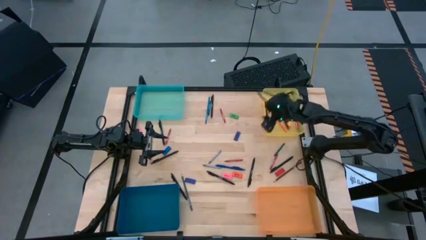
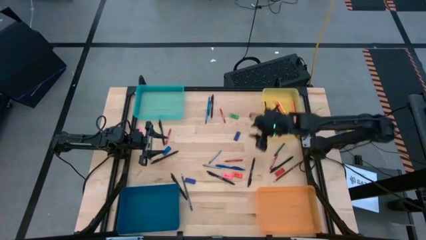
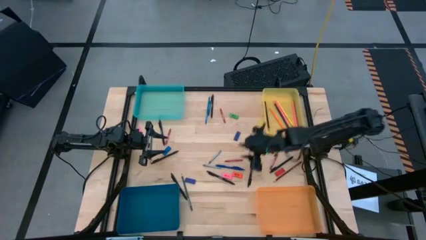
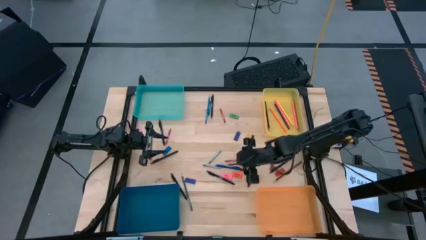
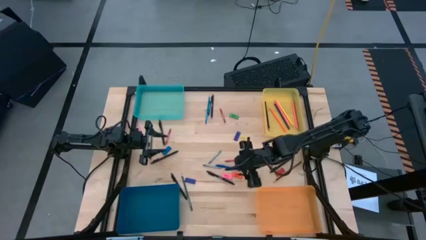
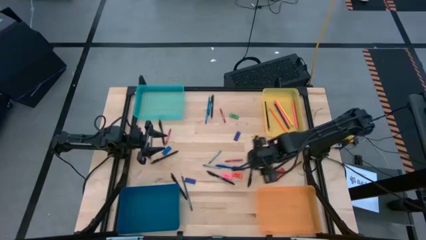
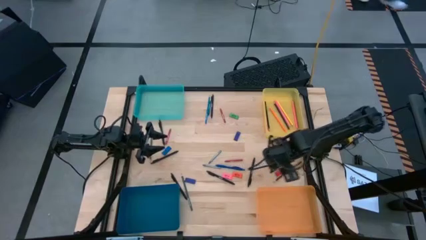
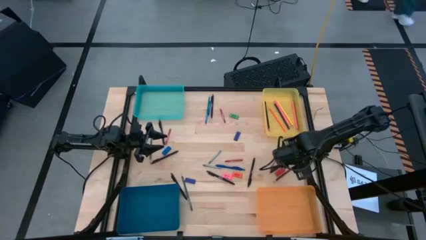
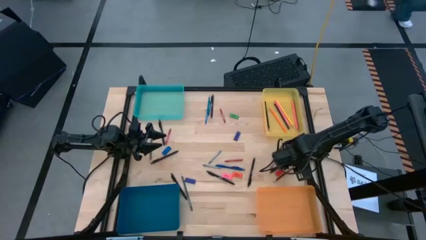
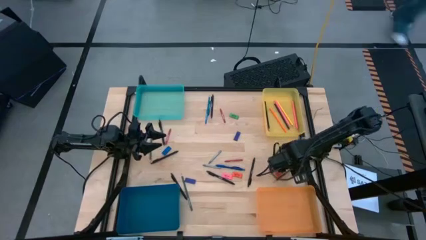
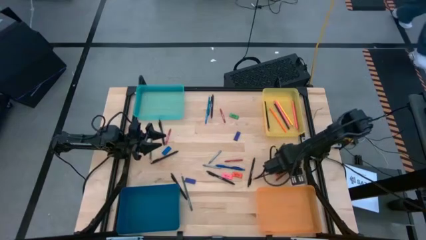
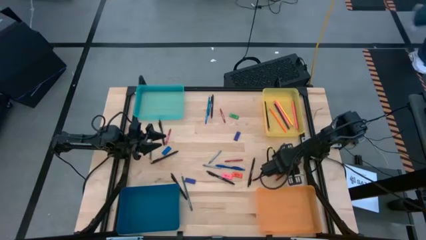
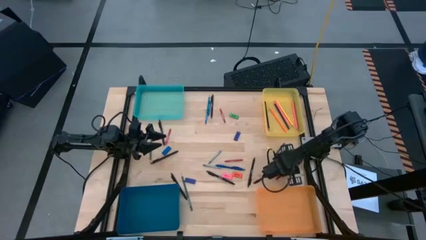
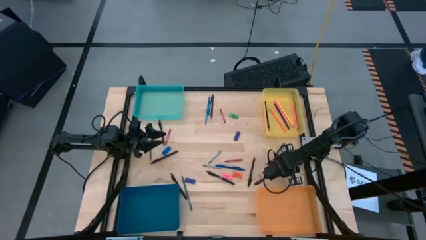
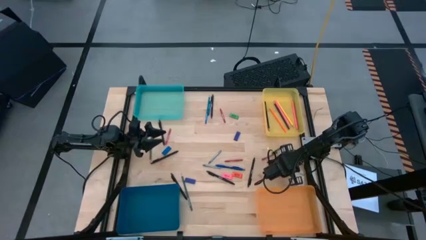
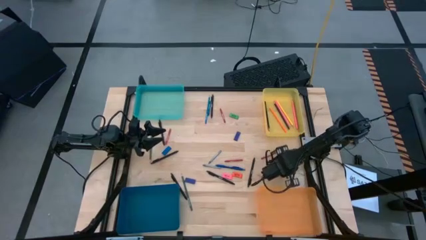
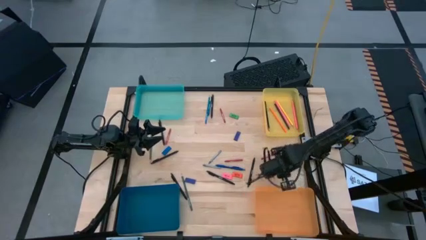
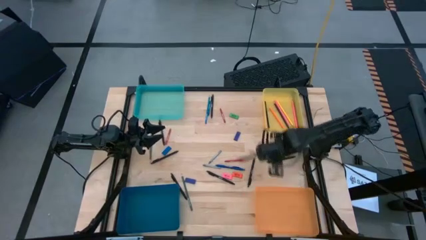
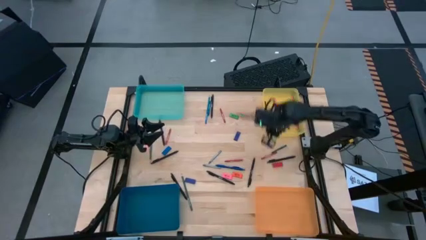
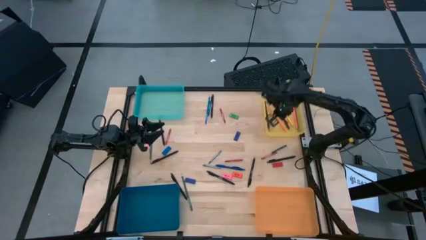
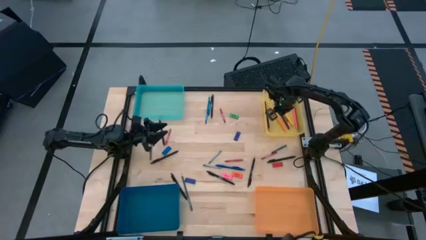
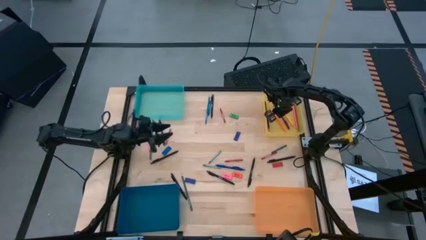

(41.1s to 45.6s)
Task: Sort crayons/erasers/pens/pencils in bins
Put the brown pencil into the yellow bin

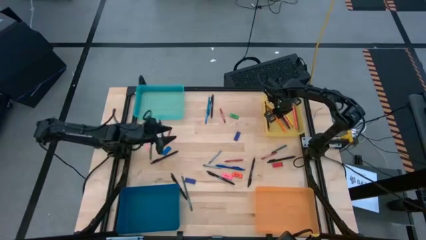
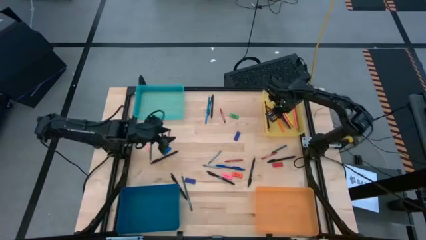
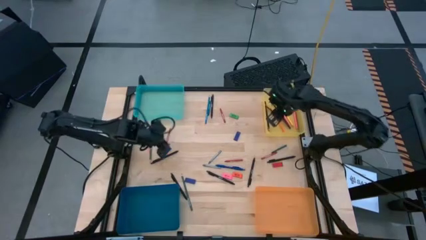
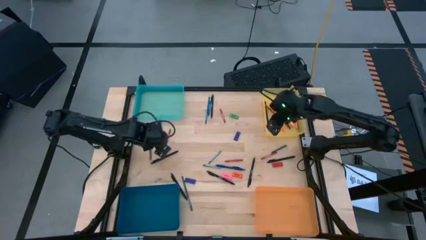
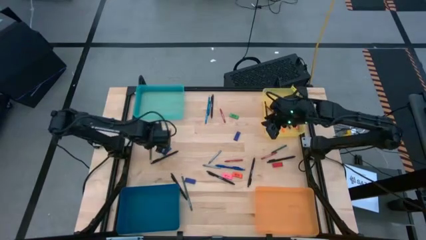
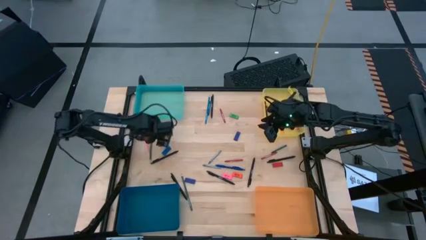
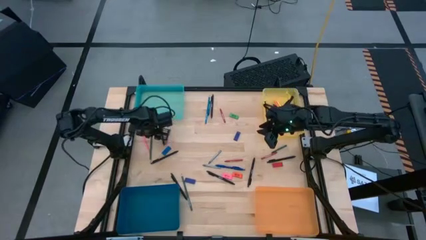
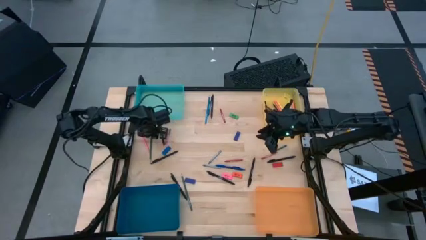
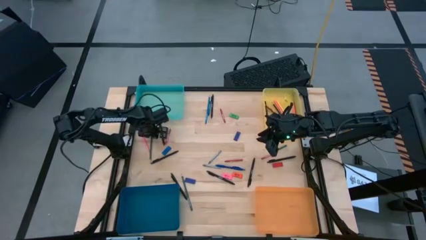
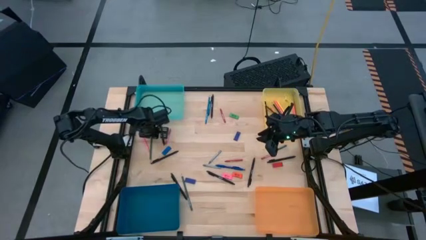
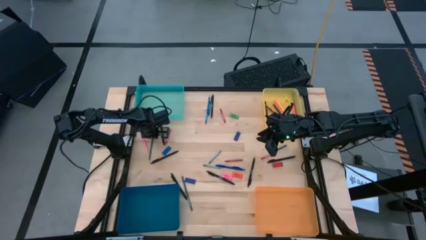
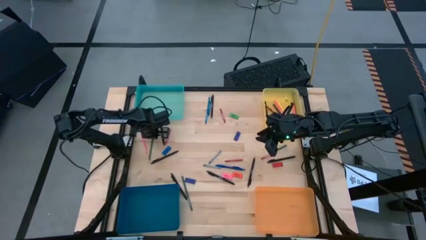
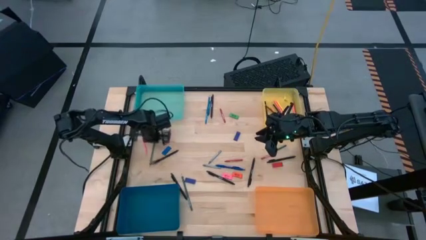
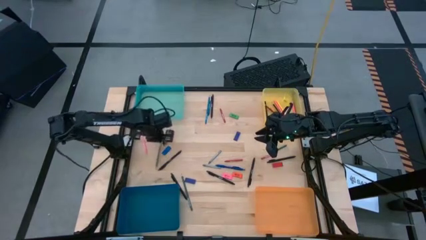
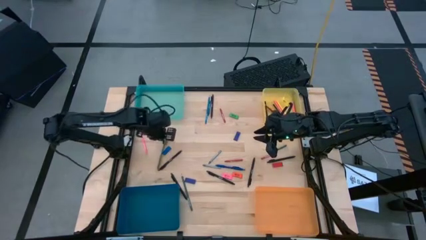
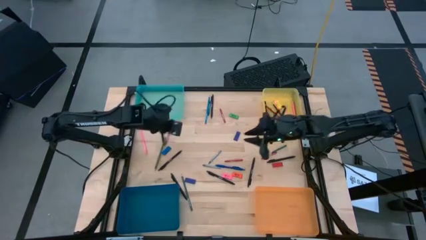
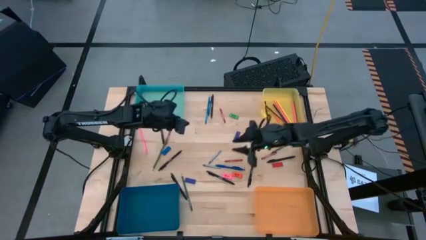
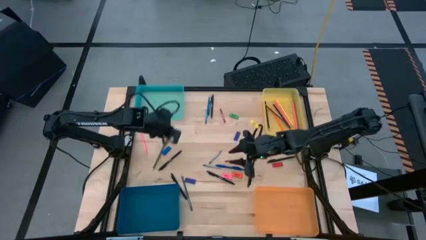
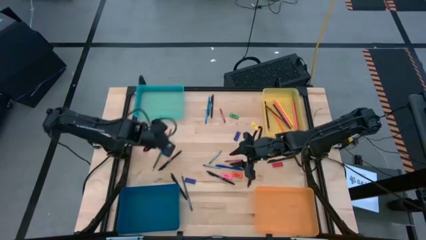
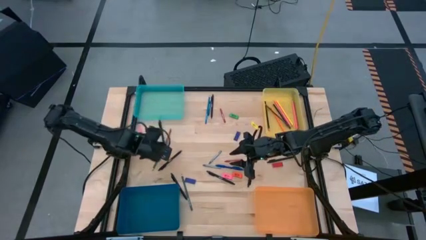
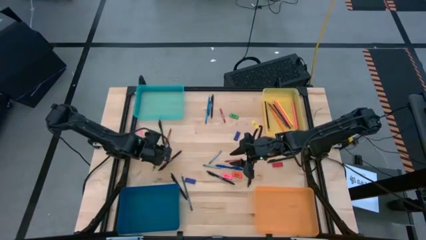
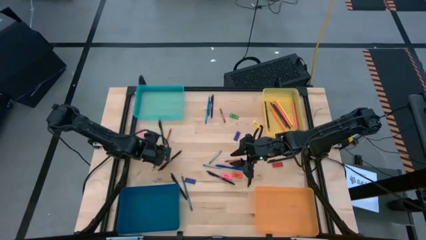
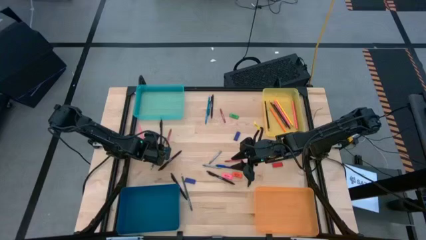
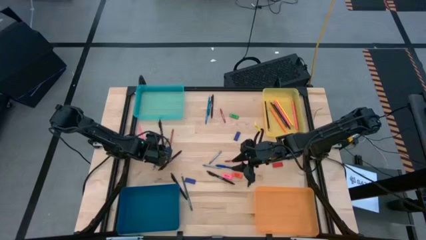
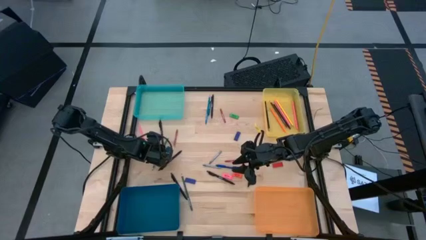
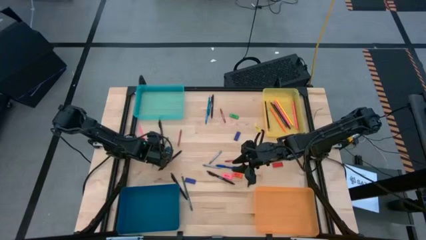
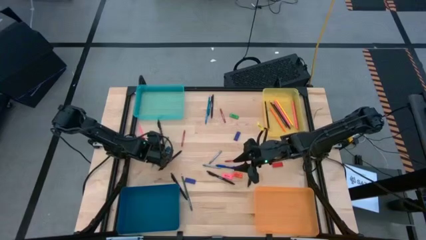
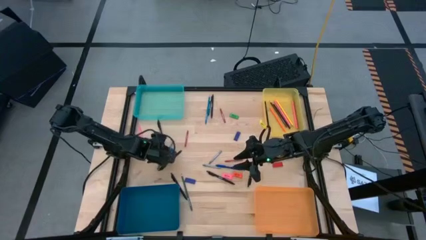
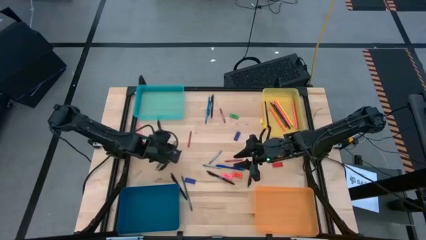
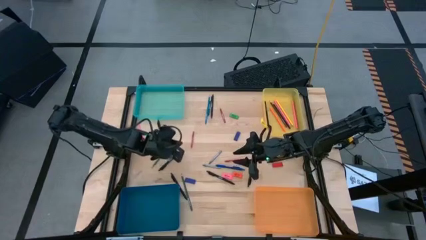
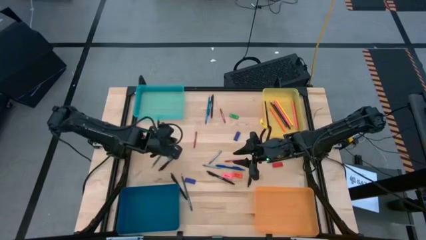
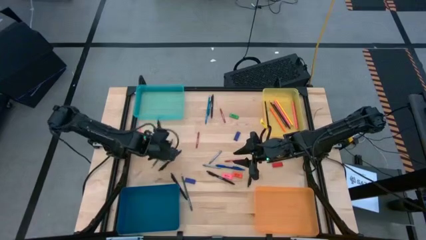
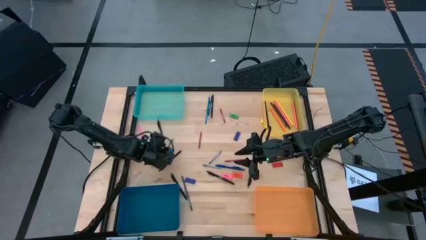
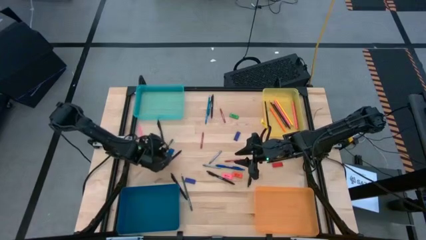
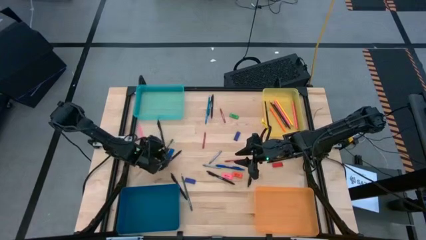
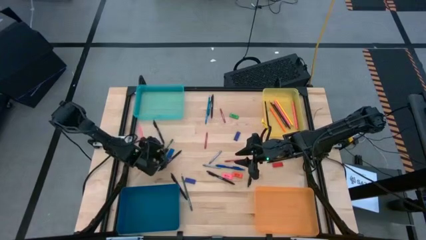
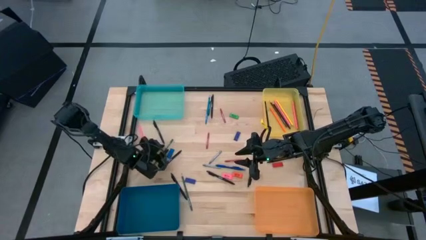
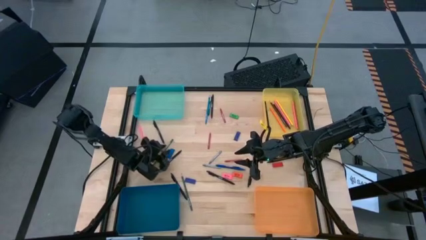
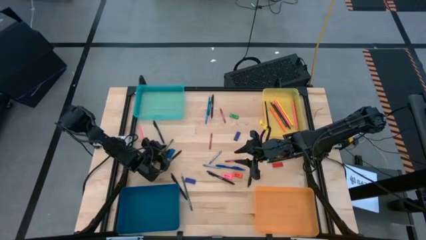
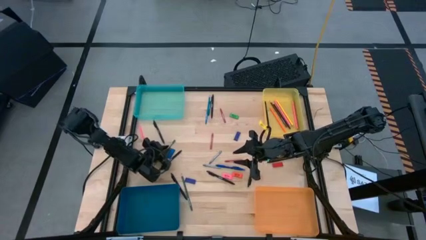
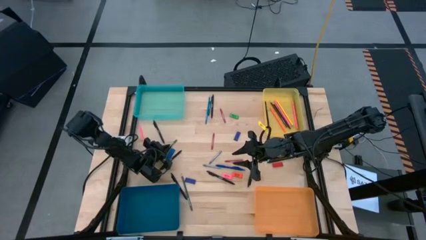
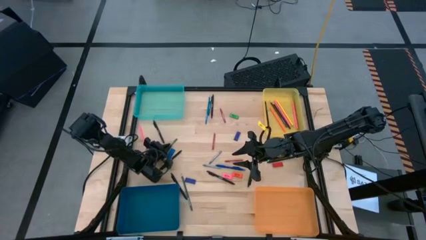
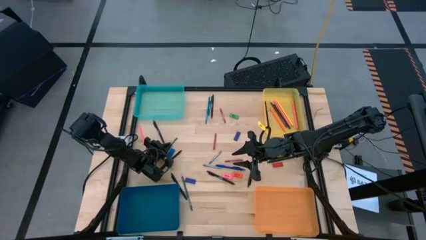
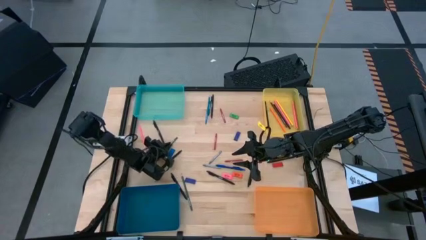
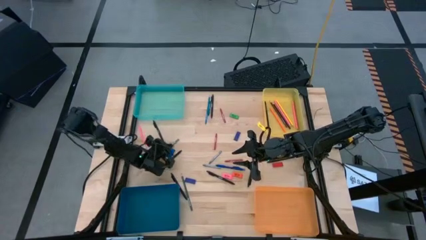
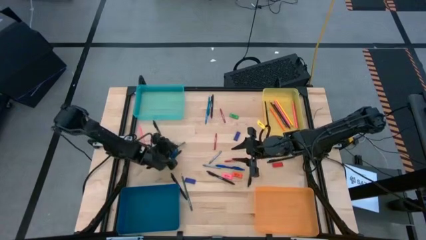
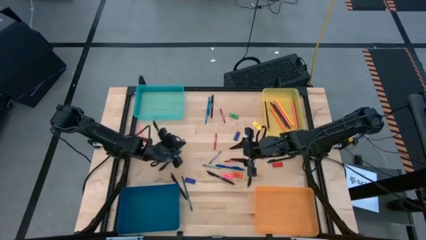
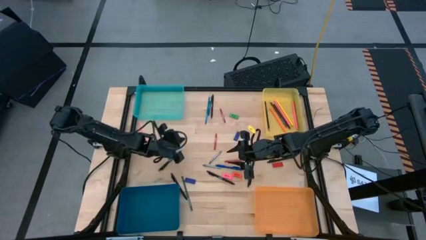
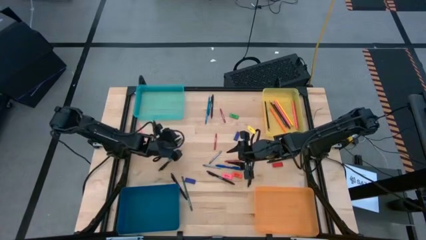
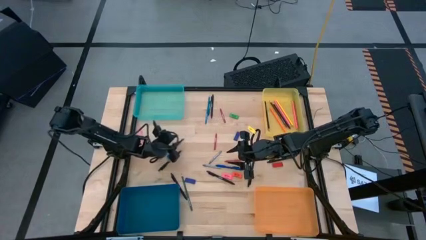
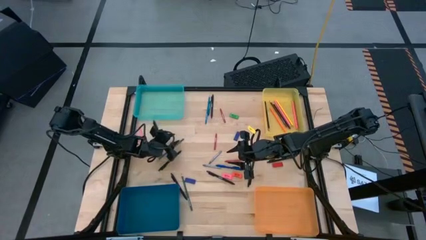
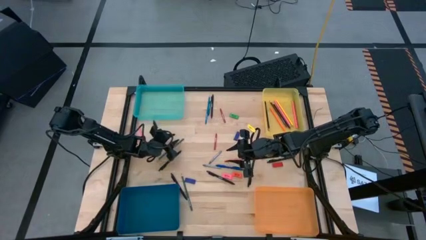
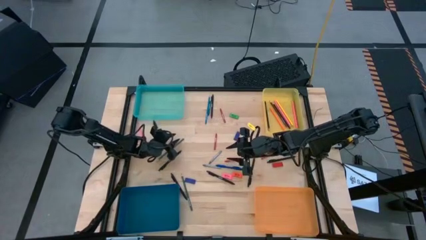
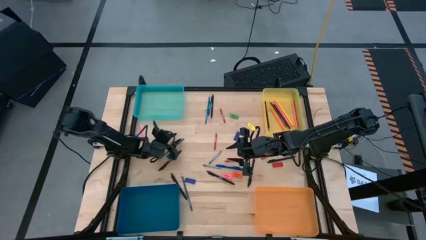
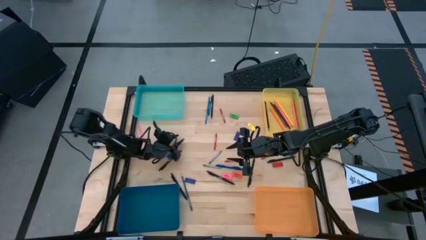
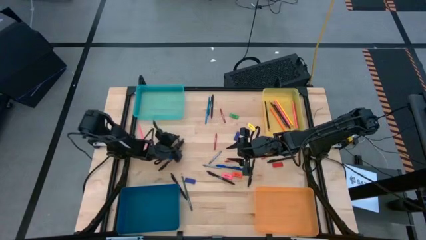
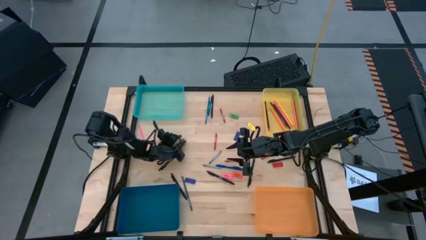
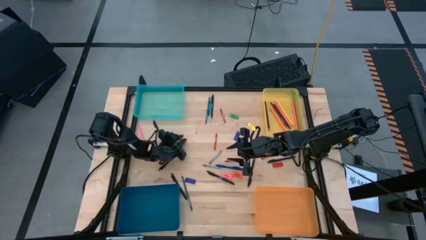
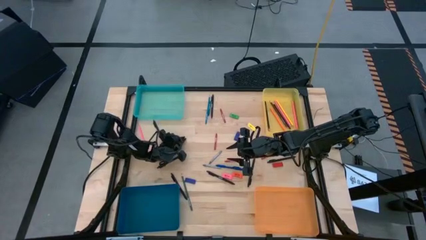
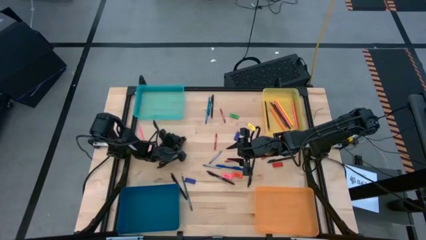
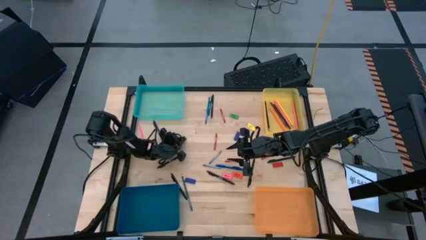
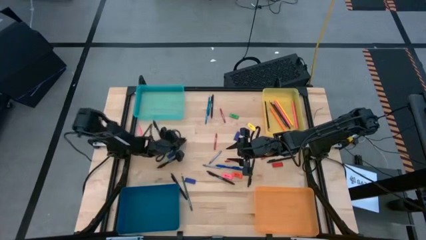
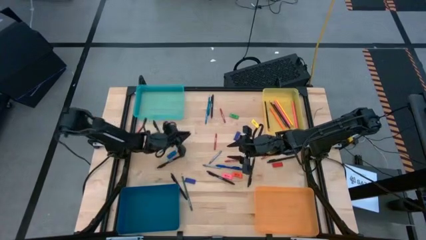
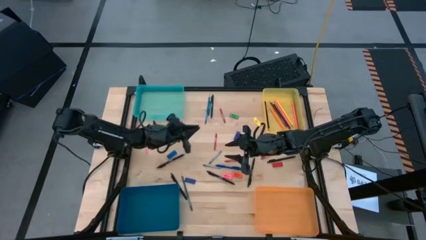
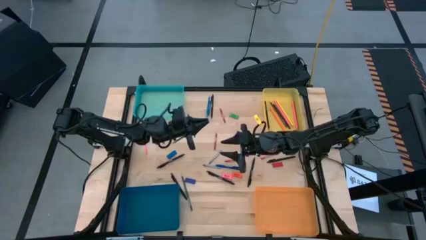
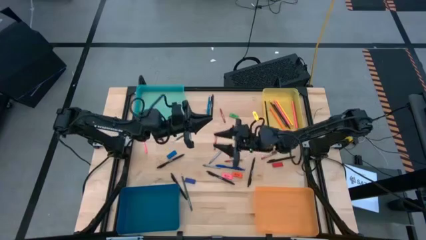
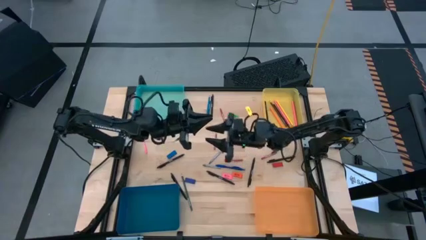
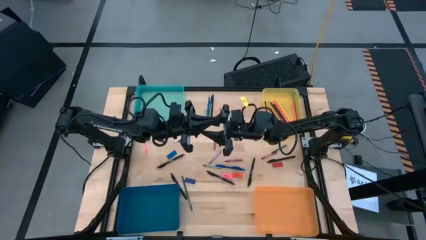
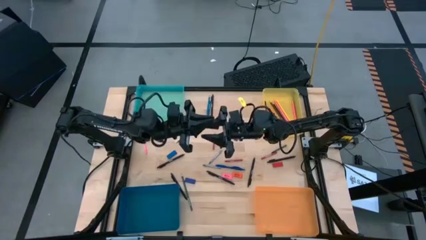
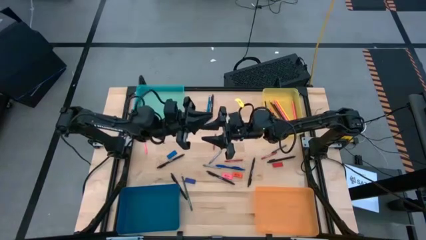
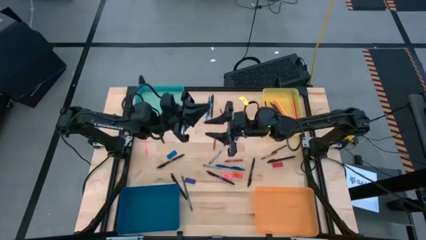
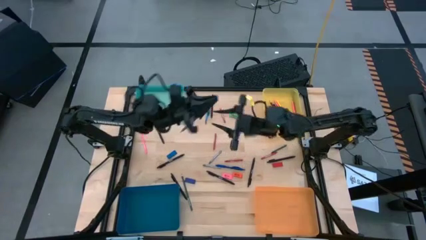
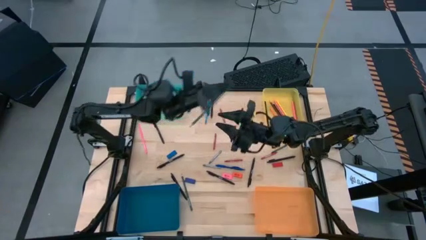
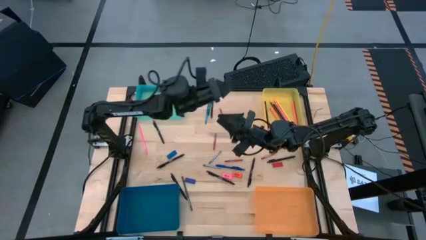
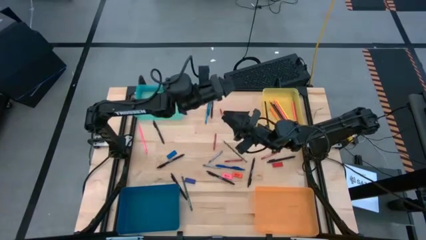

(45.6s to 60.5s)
Put the green pencil into the yellow bin
